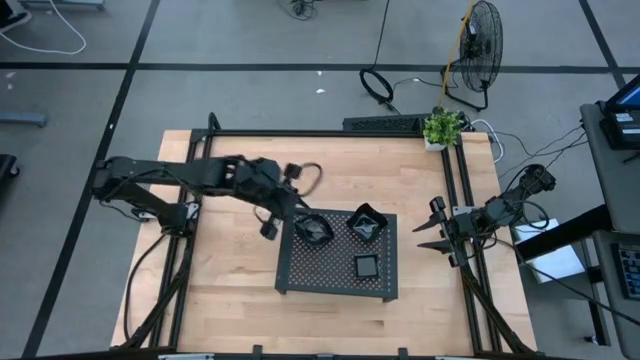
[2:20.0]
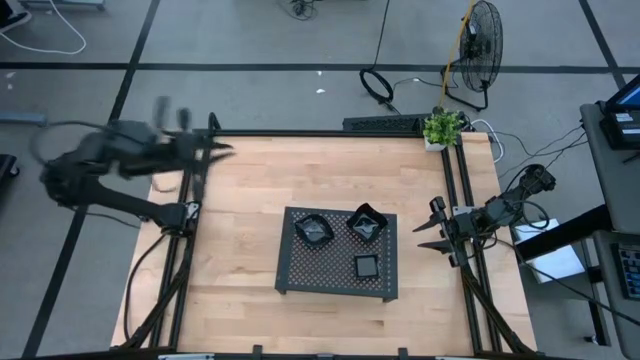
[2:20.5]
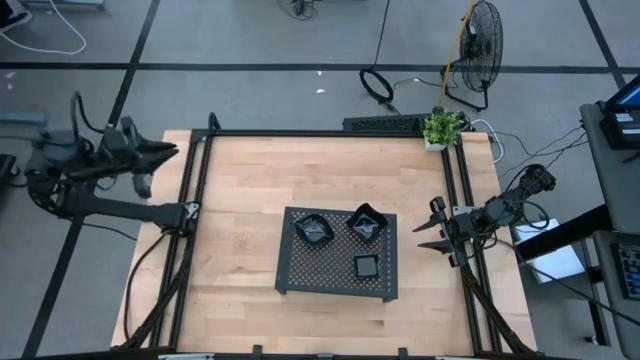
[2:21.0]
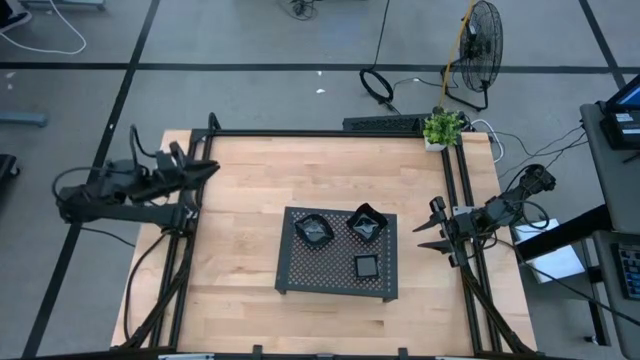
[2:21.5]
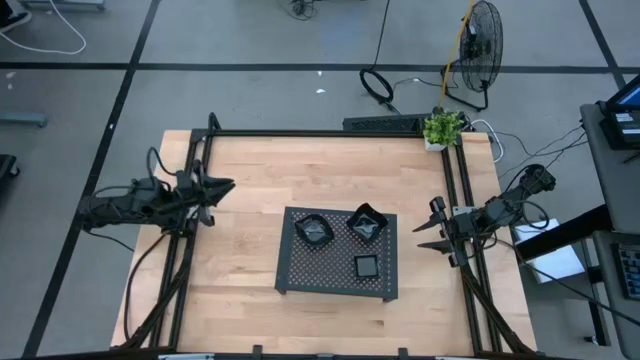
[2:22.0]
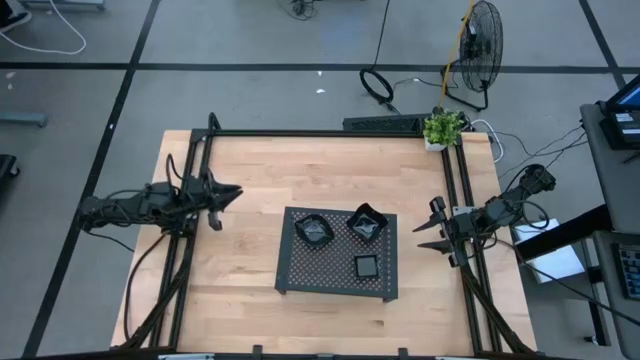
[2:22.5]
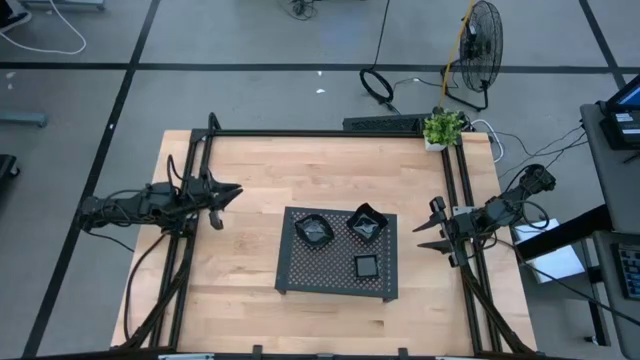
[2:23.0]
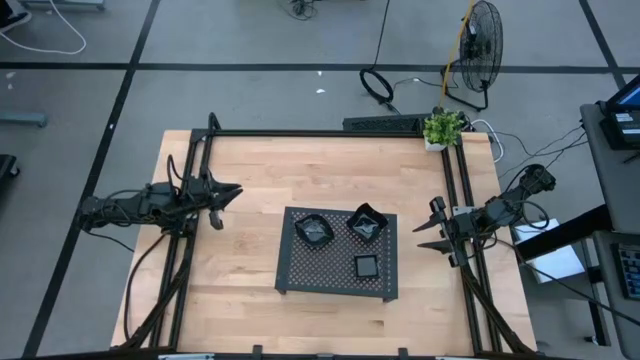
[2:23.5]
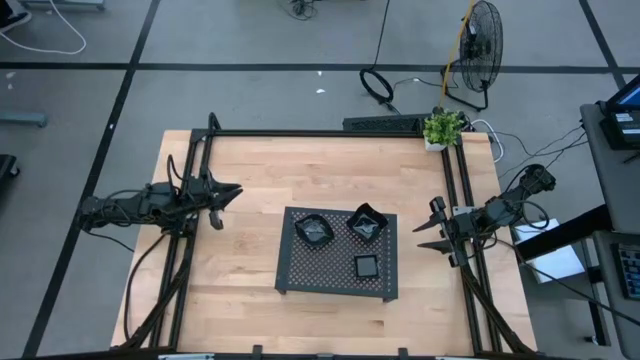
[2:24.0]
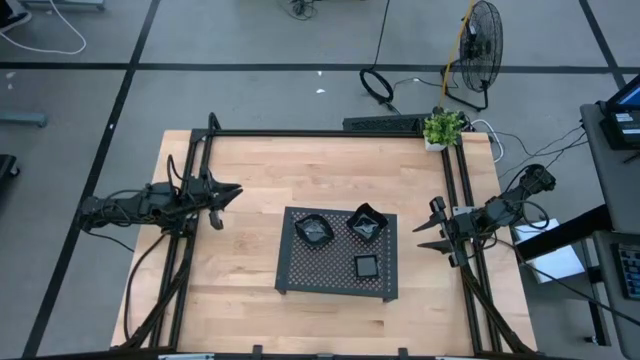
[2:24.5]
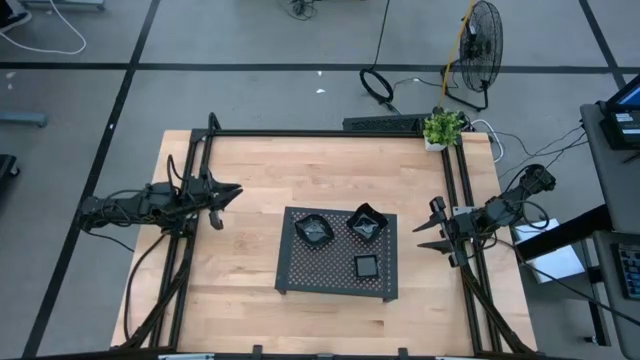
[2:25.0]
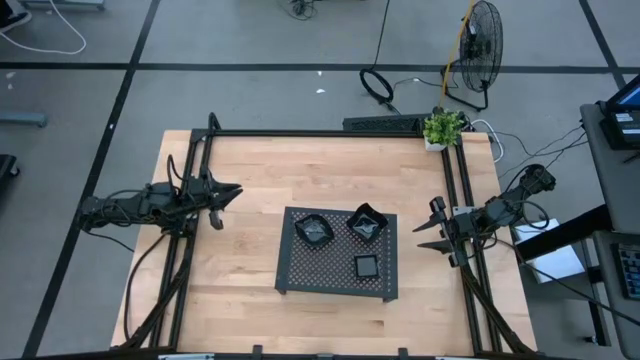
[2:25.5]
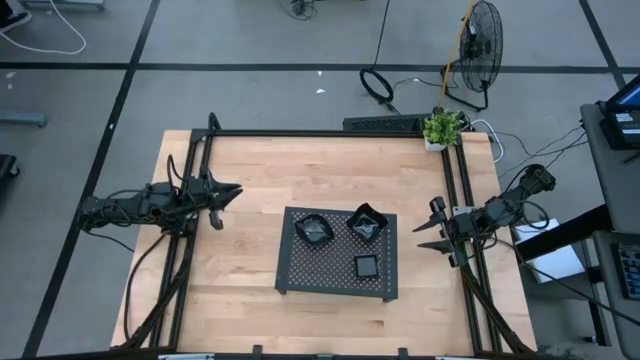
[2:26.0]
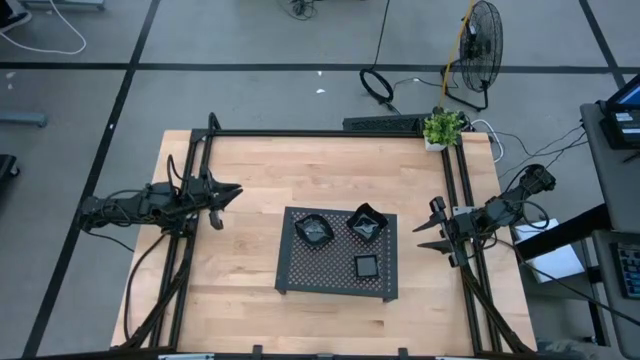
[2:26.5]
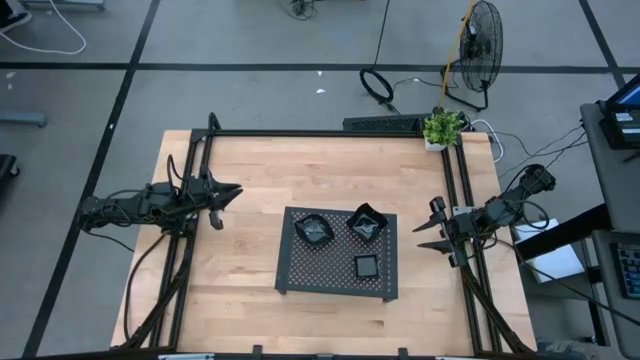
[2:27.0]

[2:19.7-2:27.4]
Task: Pick & Place Mini shaped plates
Return to Home Position

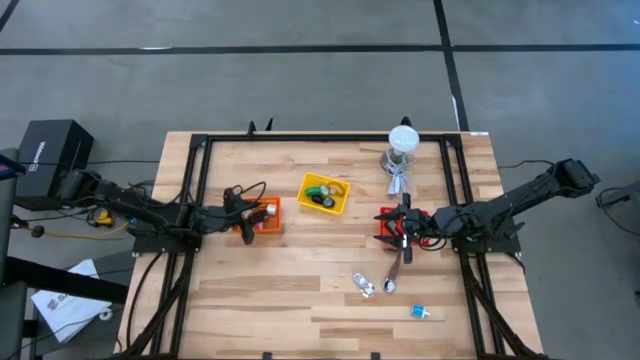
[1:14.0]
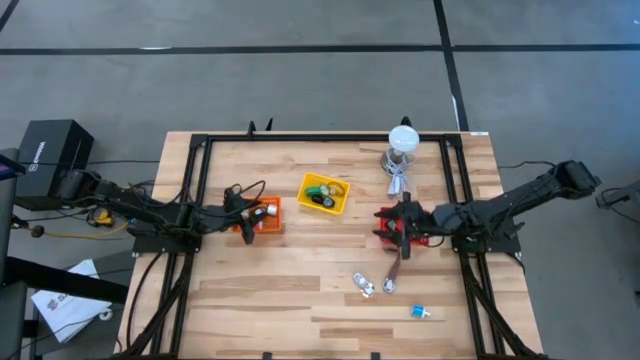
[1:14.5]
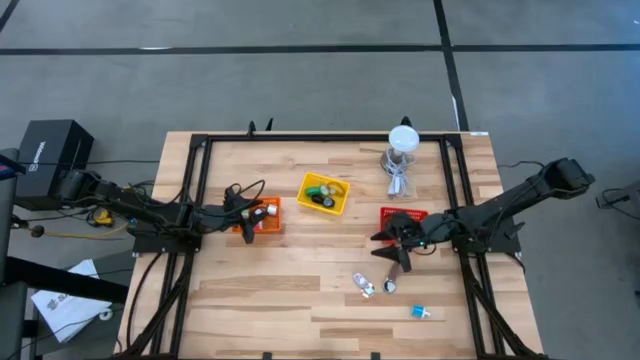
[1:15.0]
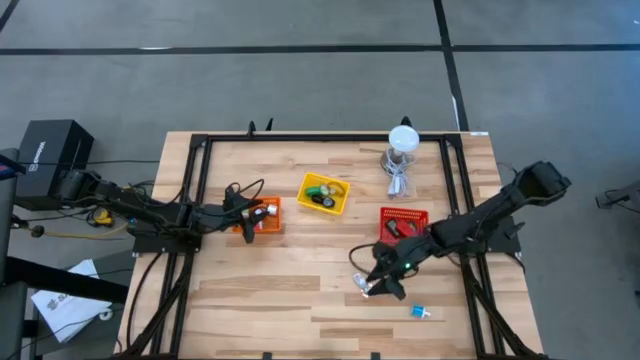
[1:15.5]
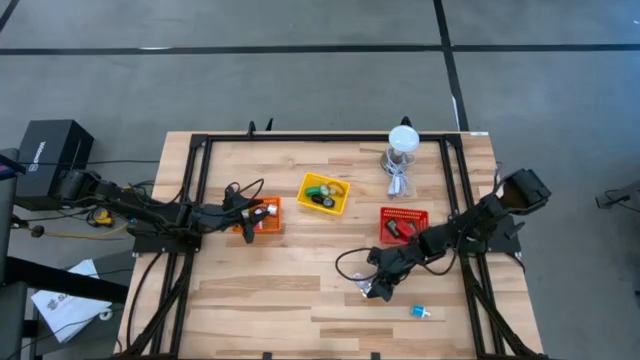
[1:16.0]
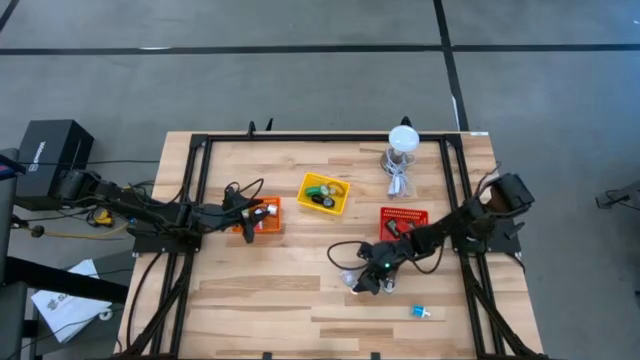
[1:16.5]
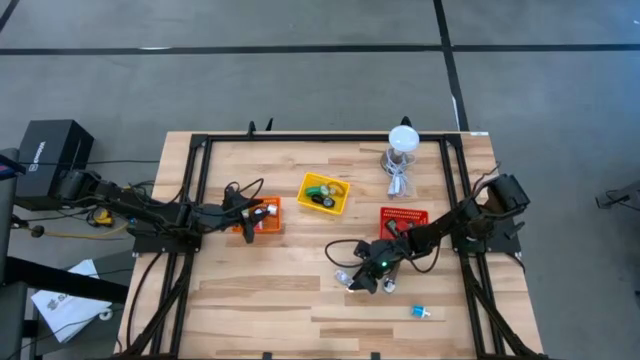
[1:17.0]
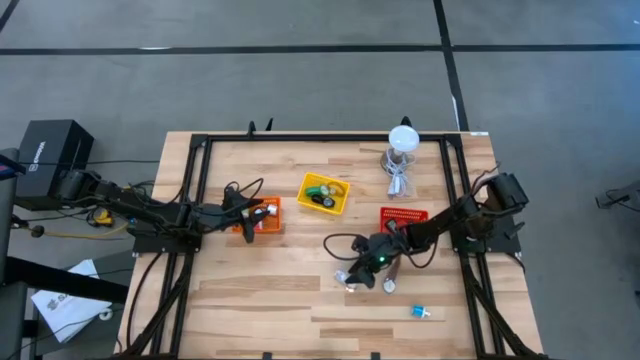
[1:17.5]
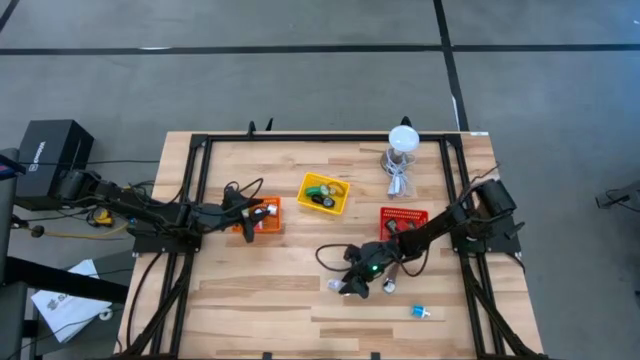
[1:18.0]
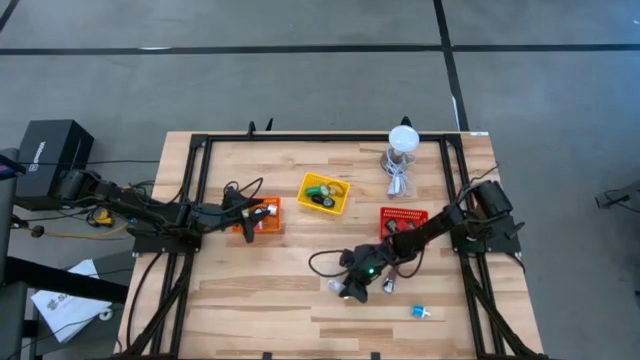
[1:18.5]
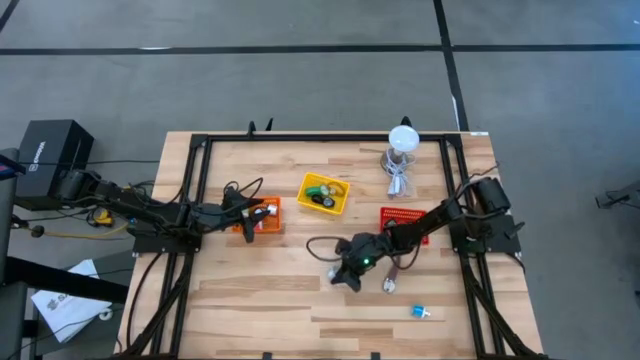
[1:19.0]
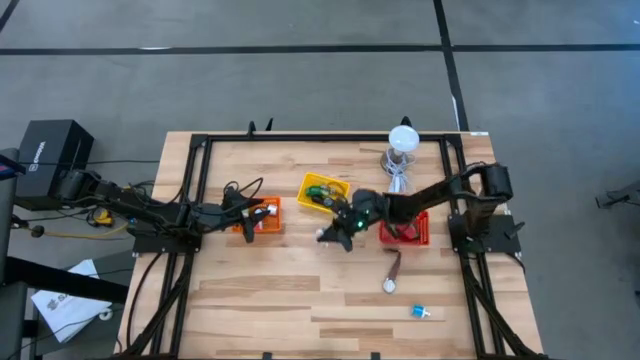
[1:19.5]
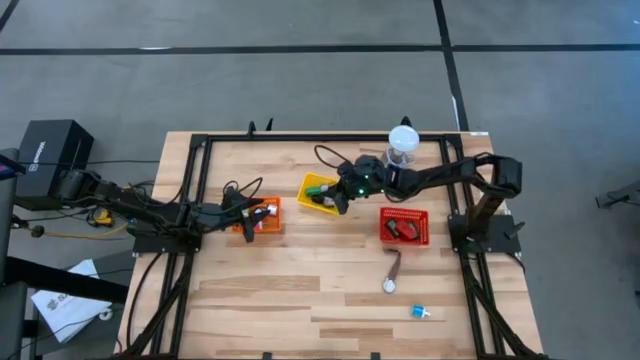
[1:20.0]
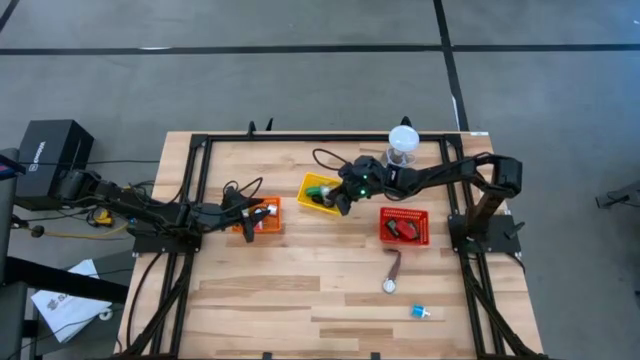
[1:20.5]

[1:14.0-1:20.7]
Task: Pick & Place Office items
Put the white wristwatch into the yellow bin
